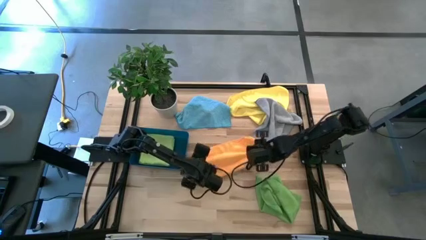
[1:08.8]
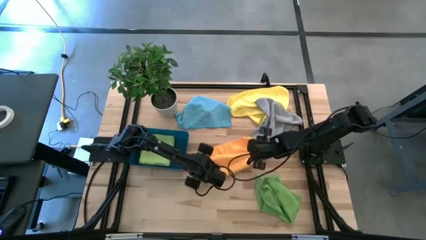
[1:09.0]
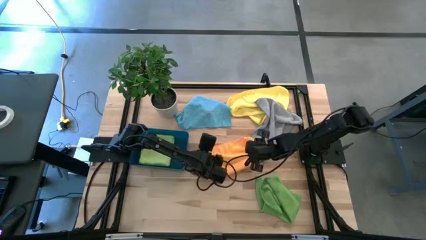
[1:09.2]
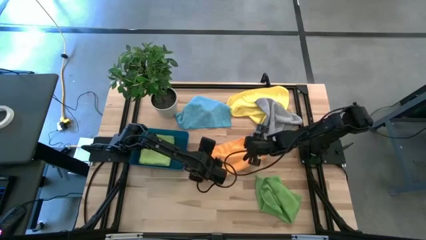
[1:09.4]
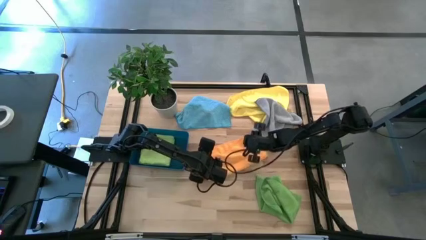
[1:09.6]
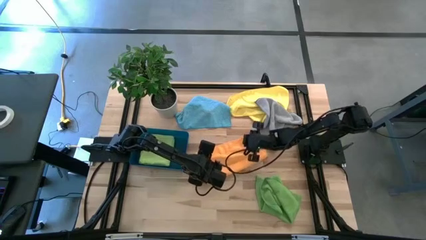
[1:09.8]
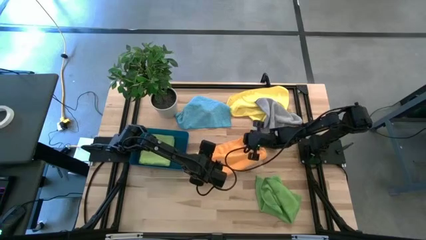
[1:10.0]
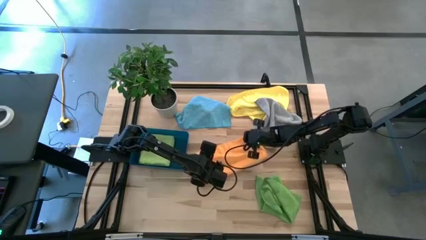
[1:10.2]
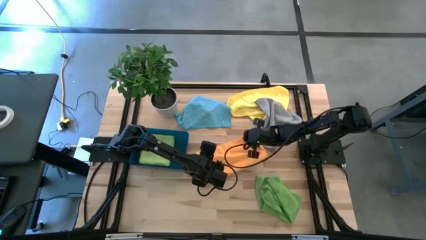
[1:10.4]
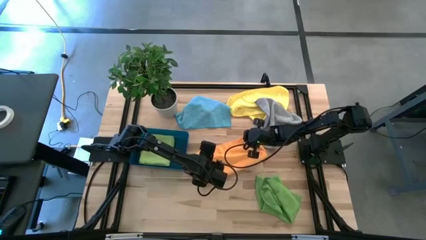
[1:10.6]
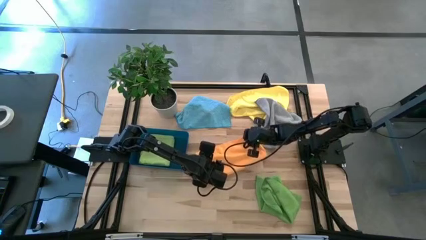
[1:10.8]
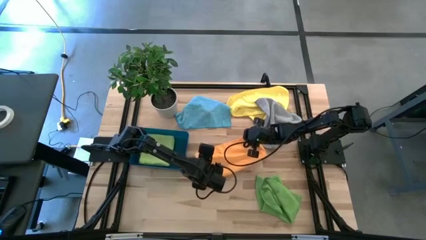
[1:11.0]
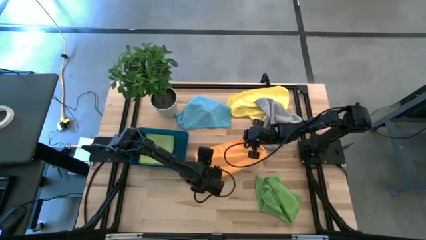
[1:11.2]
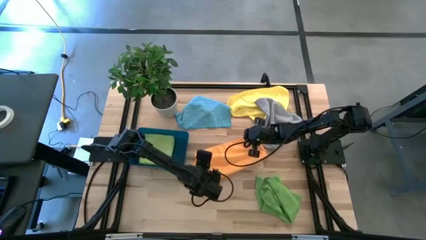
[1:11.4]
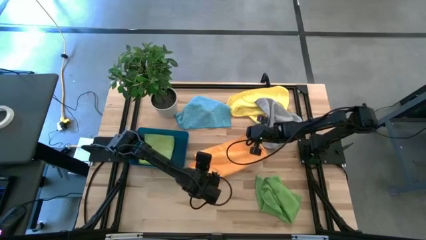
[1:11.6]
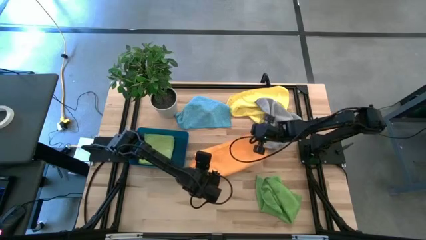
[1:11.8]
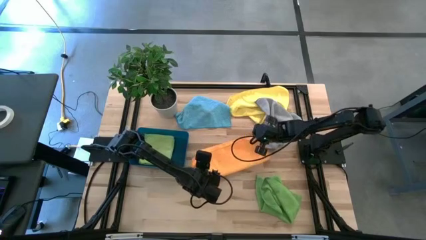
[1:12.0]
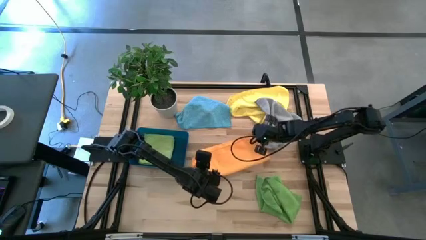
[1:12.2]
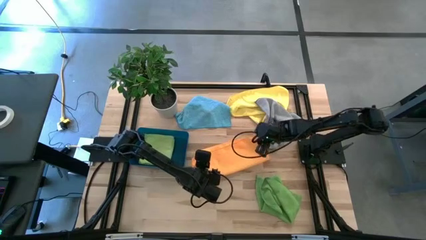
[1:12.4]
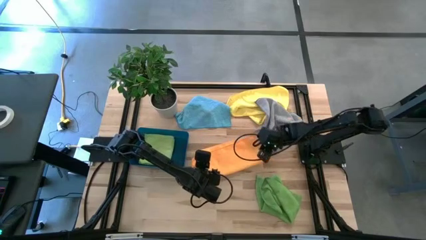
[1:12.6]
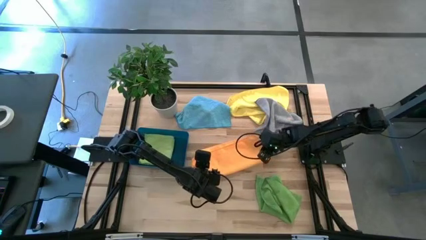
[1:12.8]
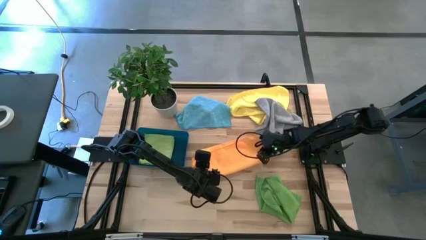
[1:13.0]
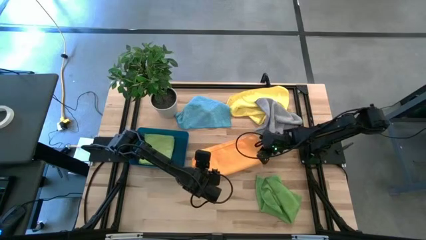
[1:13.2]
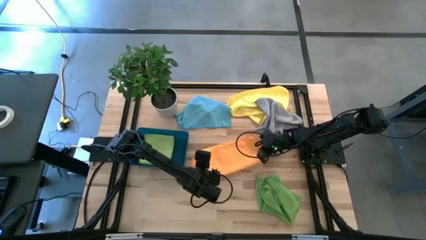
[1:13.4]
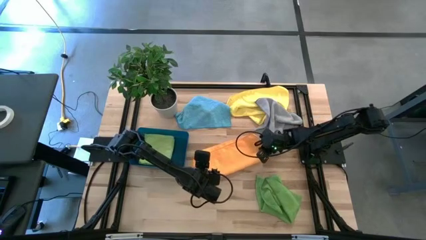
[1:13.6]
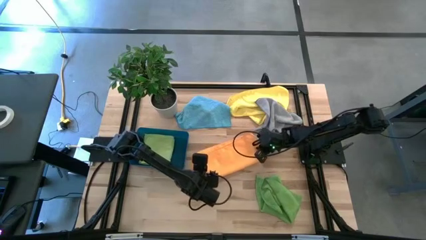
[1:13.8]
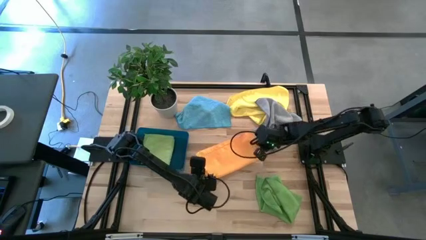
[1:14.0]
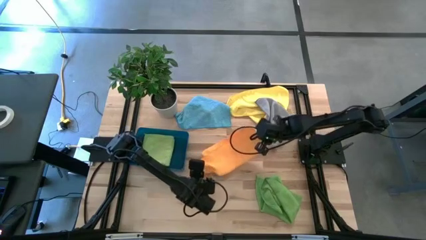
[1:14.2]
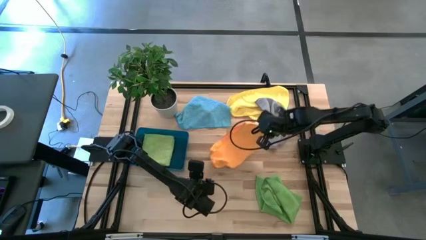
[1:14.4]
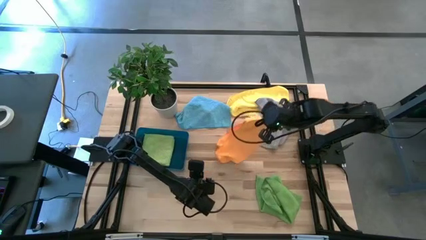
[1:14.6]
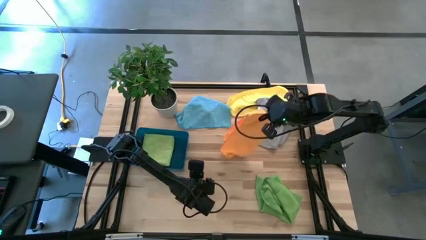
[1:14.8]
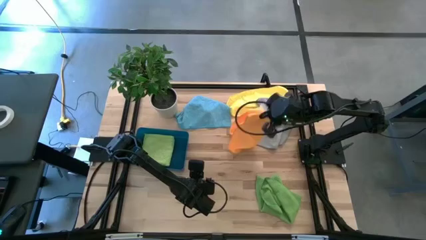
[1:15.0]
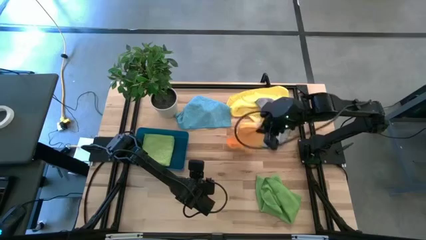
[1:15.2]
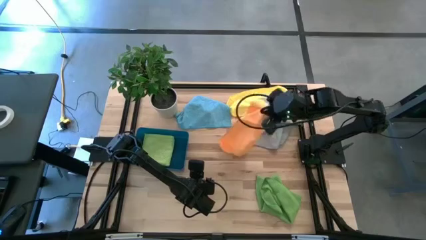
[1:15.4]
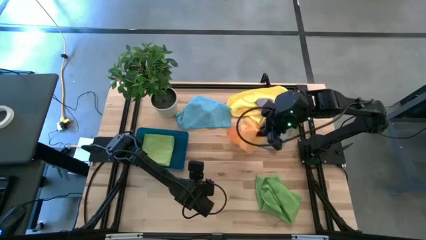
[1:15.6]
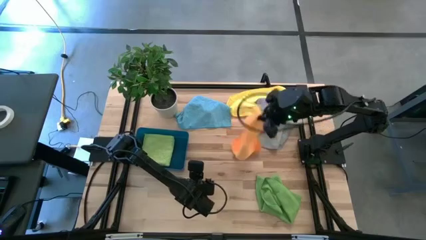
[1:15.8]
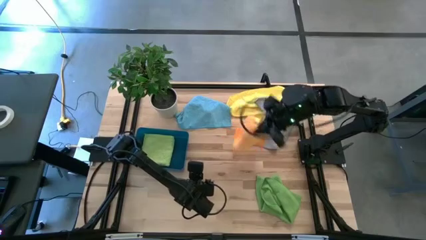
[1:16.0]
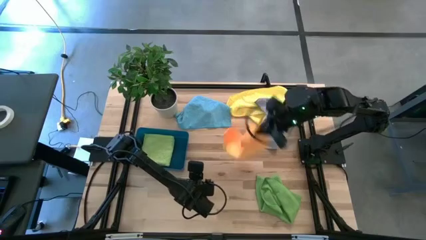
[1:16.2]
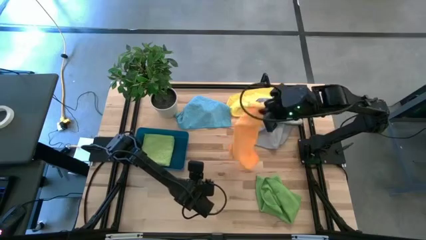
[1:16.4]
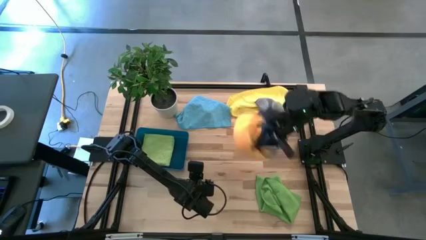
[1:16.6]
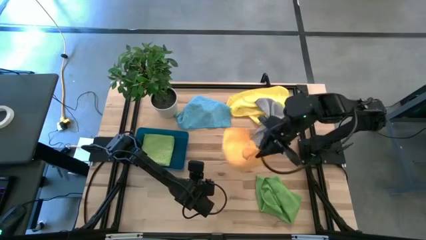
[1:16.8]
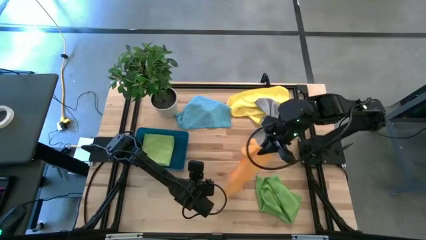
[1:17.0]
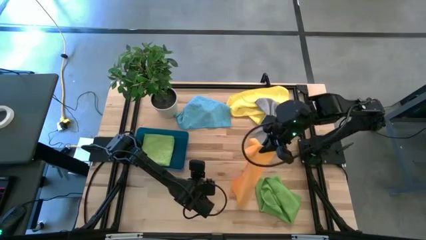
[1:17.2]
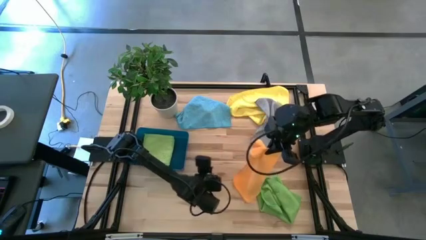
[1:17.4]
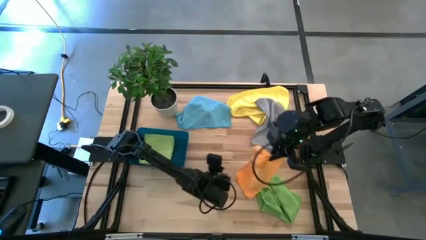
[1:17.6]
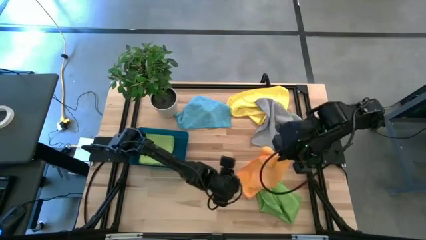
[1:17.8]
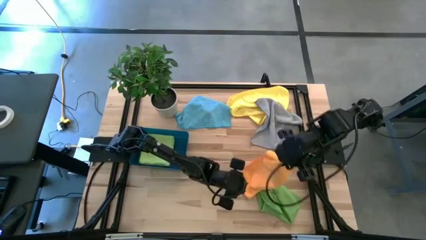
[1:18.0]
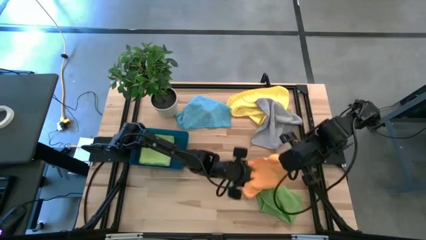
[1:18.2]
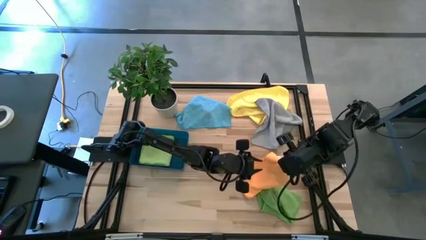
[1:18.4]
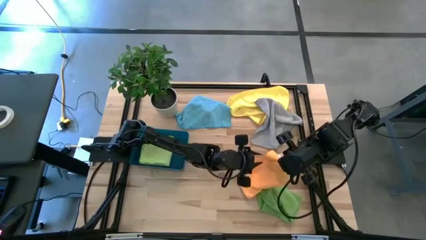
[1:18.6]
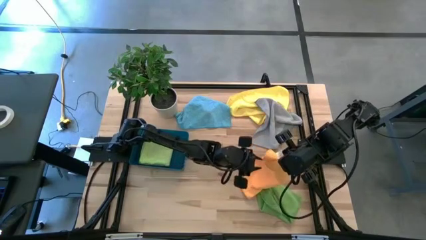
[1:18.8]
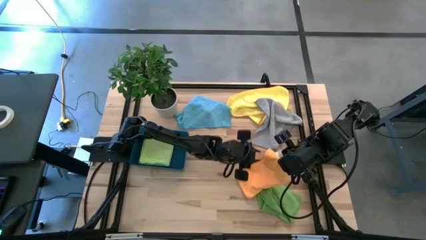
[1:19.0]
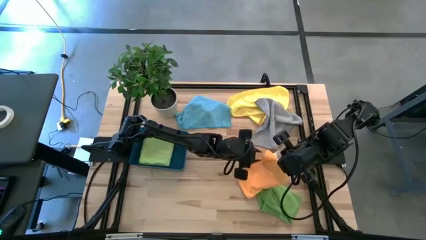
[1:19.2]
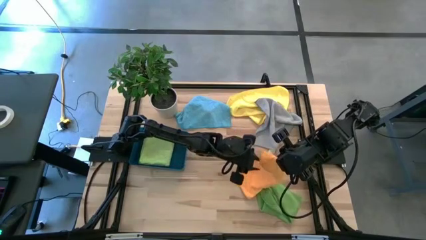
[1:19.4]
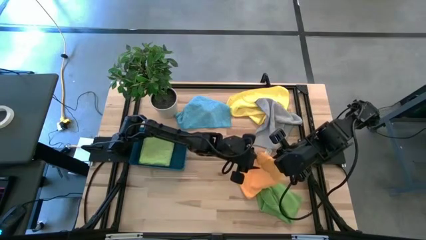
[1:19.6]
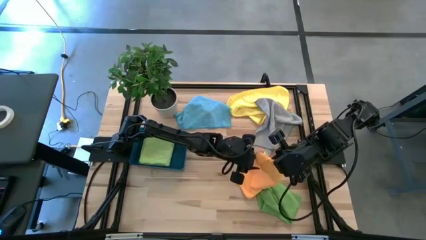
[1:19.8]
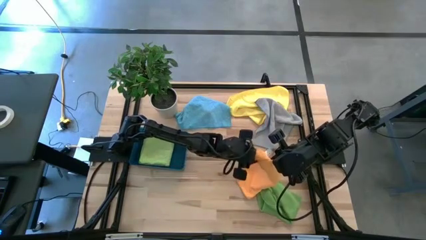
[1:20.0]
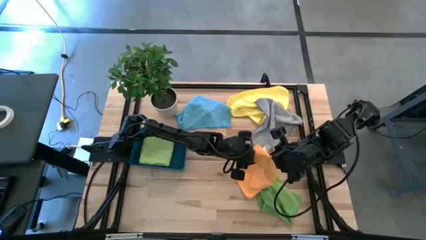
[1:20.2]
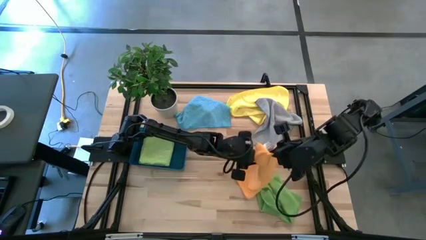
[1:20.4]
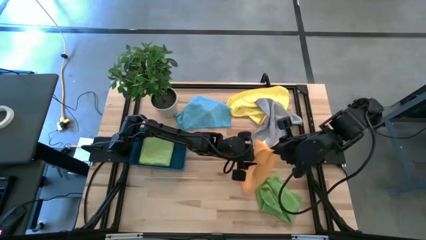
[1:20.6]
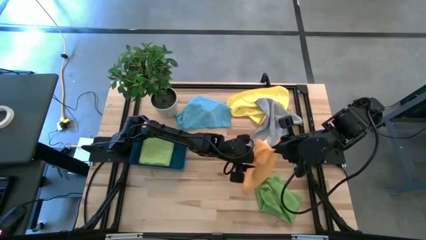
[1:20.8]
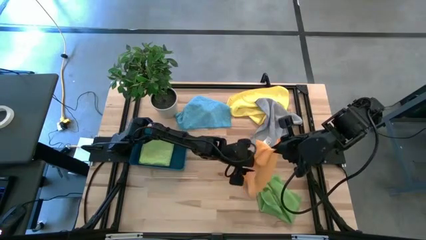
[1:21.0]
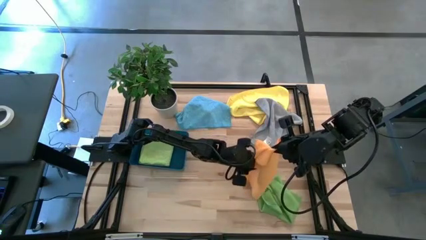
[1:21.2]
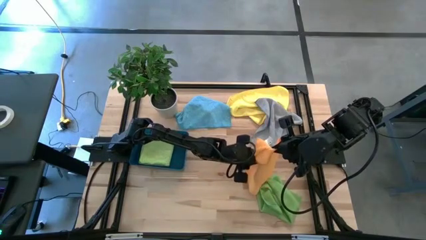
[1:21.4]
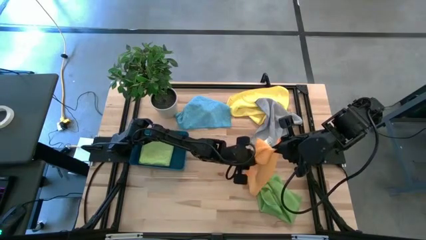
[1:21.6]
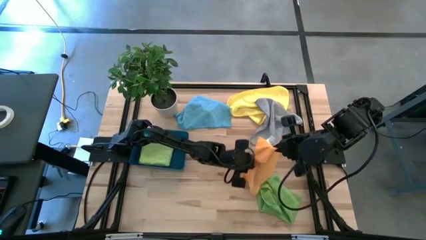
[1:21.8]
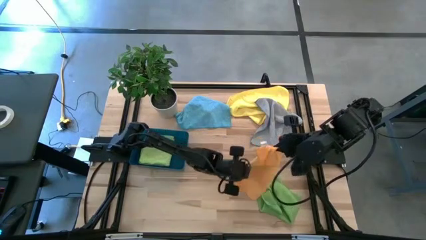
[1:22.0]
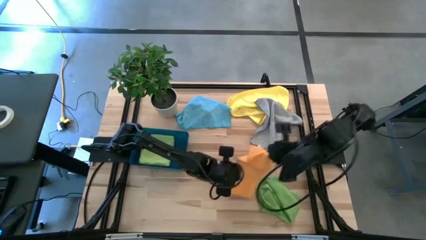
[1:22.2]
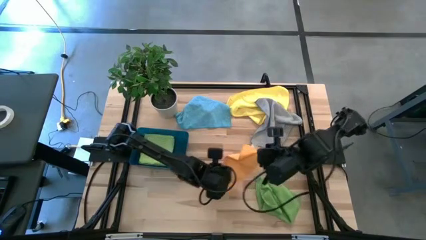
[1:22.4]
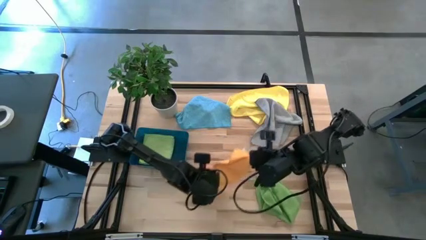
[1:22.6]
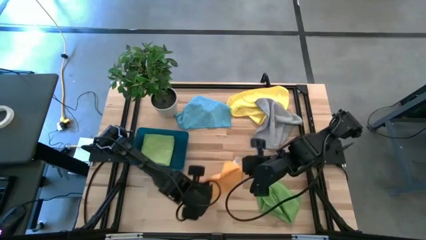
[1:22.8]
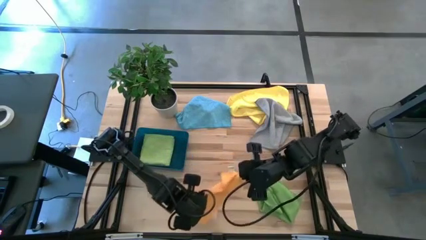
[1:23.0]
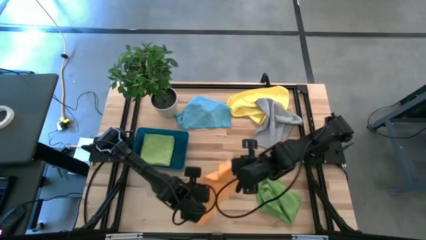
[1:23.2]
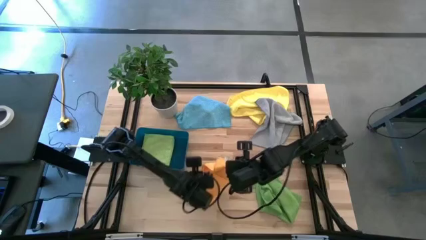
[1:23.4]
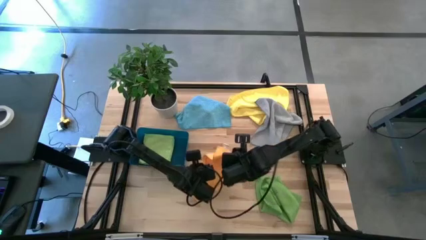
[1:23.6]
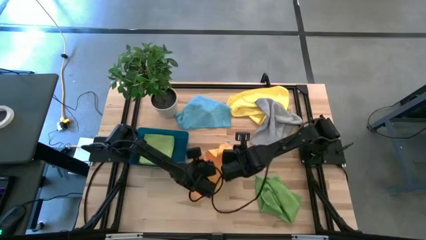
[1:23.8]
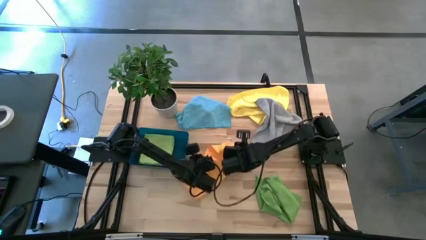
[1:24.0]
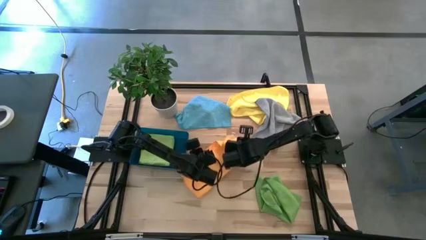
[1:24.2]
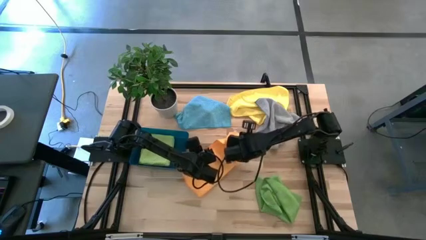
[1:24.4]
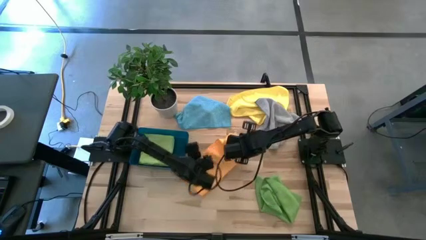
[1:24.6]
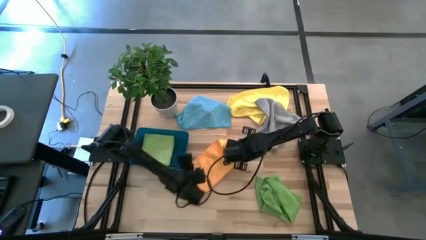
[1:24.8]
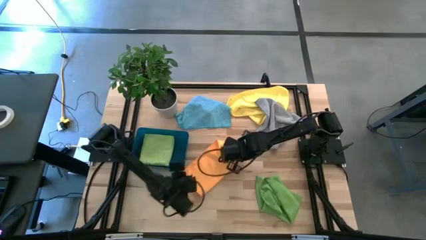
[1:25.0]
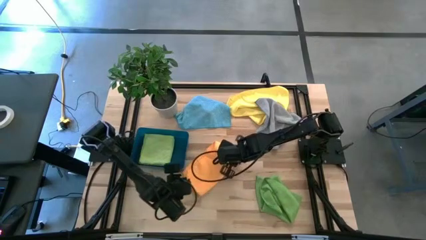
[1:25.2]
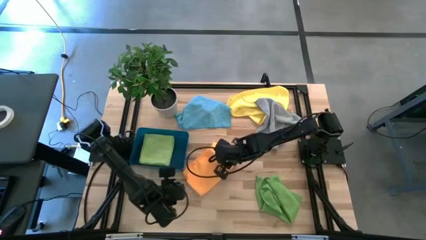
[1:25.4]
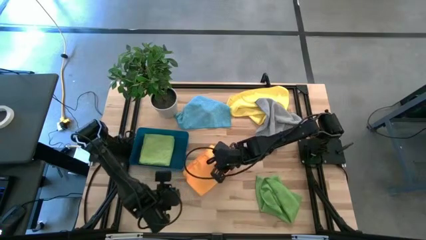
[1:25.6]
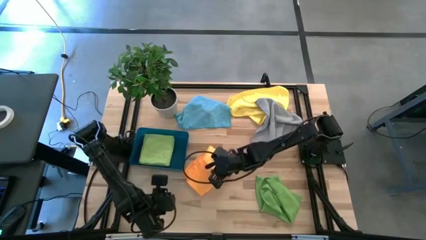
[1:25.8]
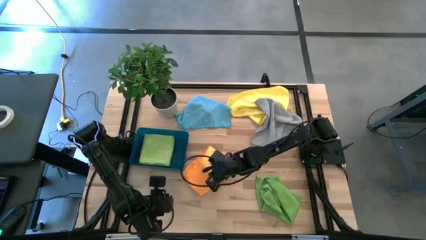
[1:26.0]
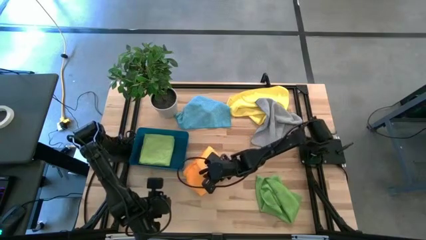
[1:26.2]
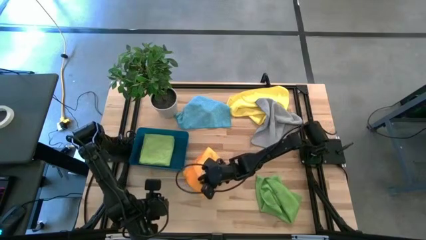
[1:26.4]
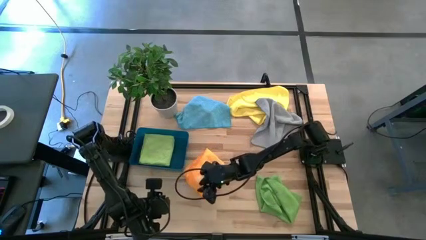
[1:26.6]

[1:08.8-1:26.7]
Task: Fold microfiber towels
Fold the orange microfiber towel on the table
